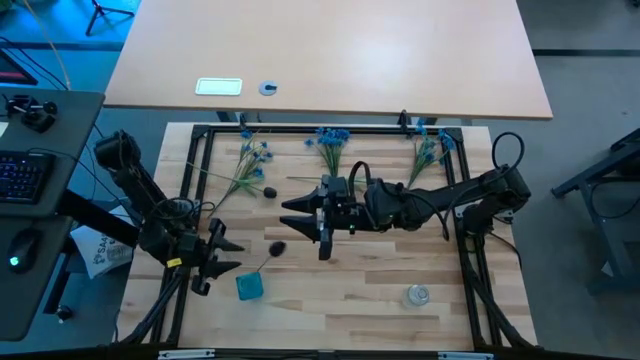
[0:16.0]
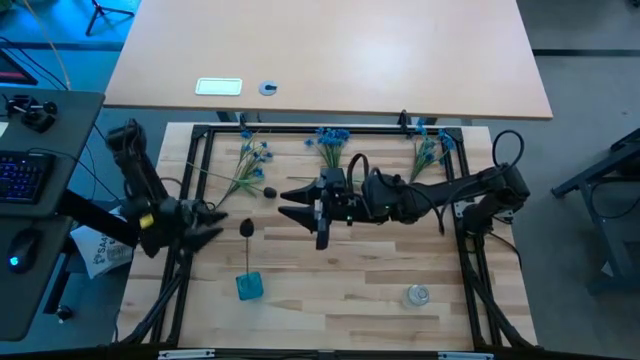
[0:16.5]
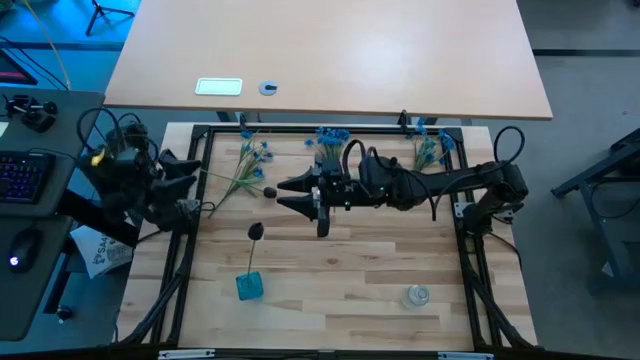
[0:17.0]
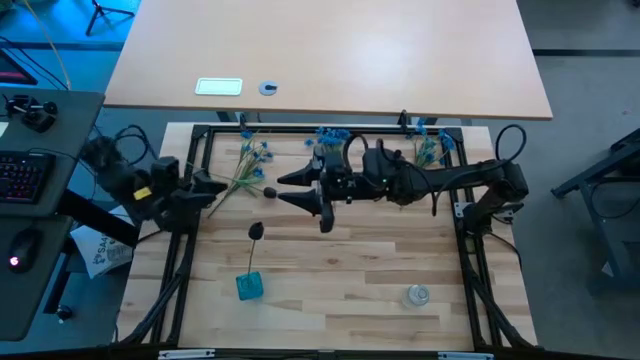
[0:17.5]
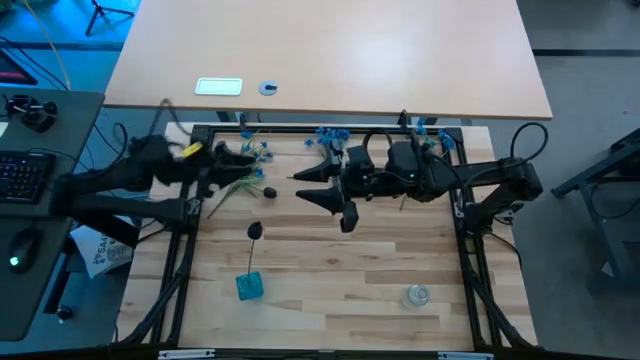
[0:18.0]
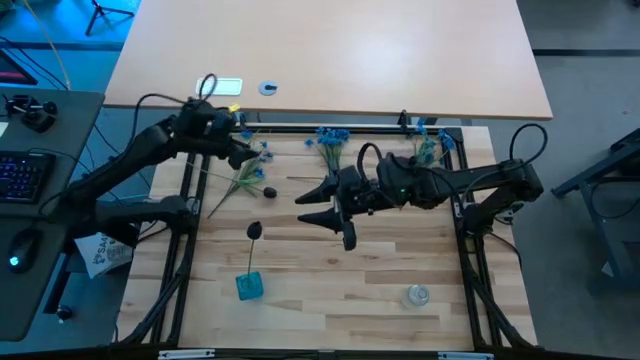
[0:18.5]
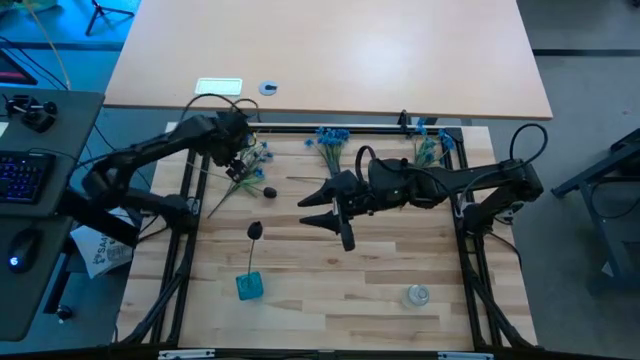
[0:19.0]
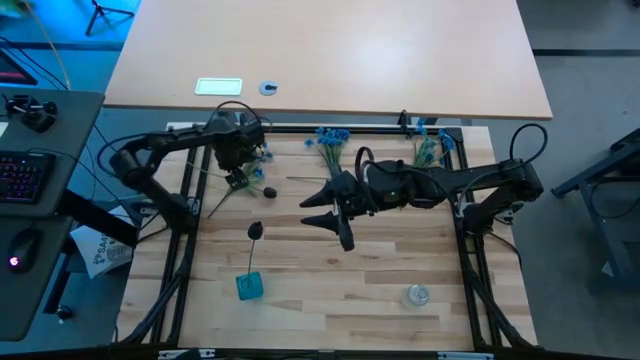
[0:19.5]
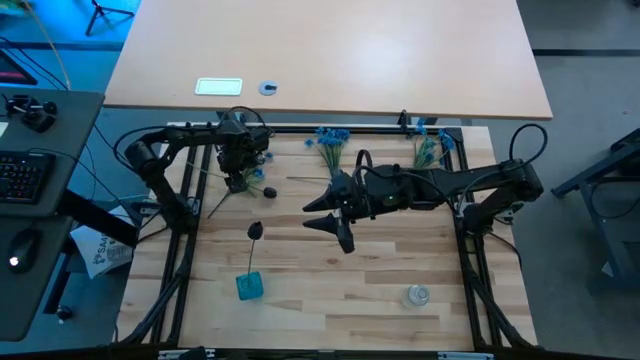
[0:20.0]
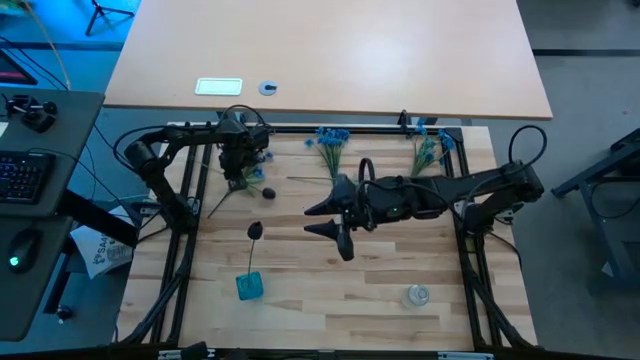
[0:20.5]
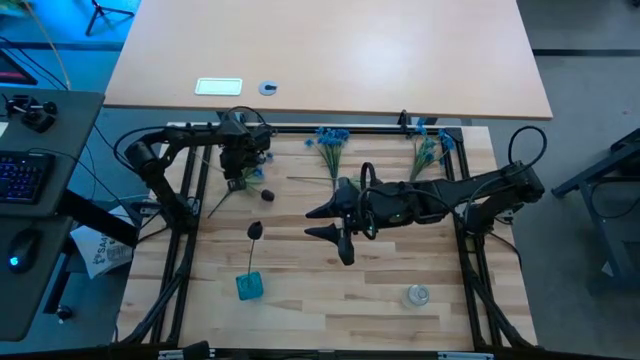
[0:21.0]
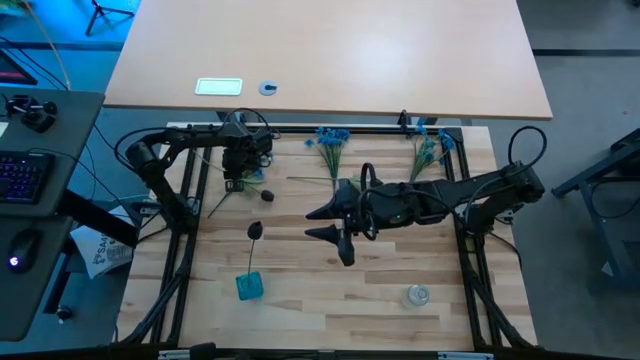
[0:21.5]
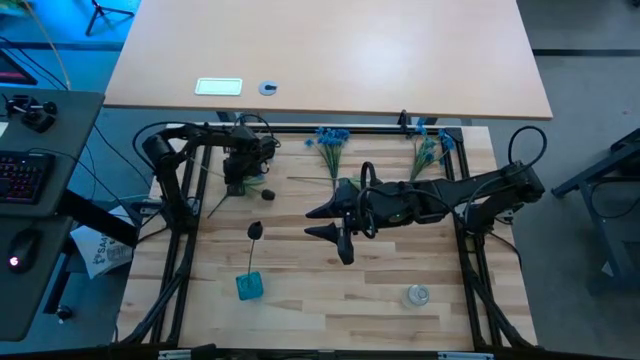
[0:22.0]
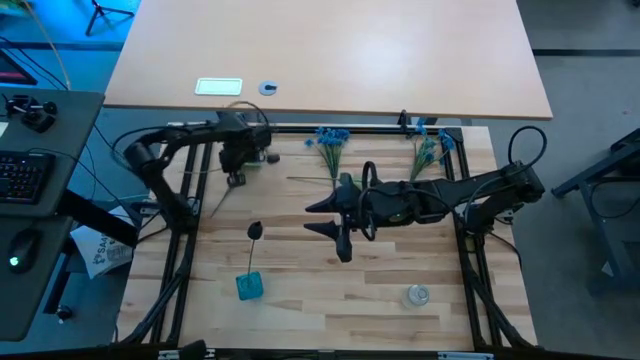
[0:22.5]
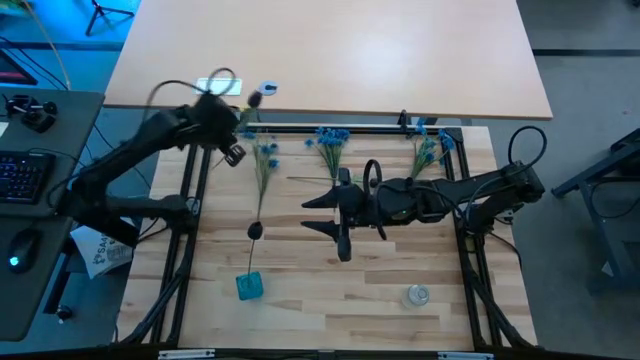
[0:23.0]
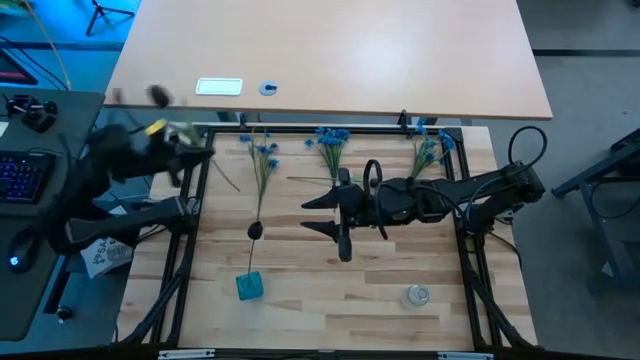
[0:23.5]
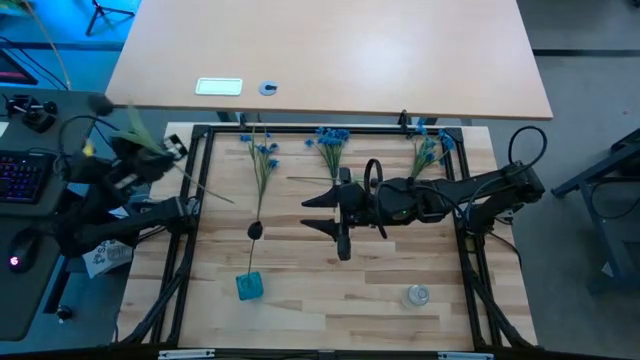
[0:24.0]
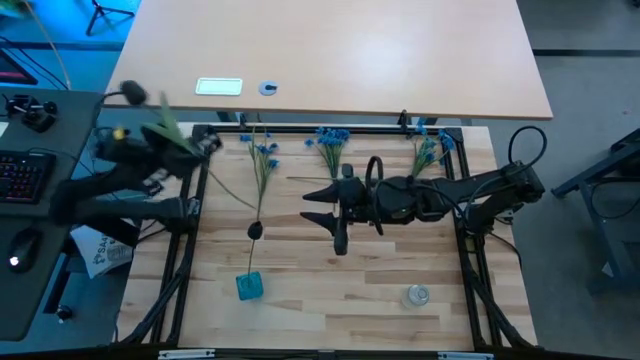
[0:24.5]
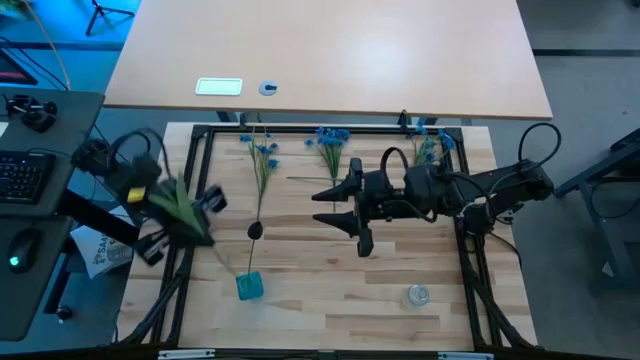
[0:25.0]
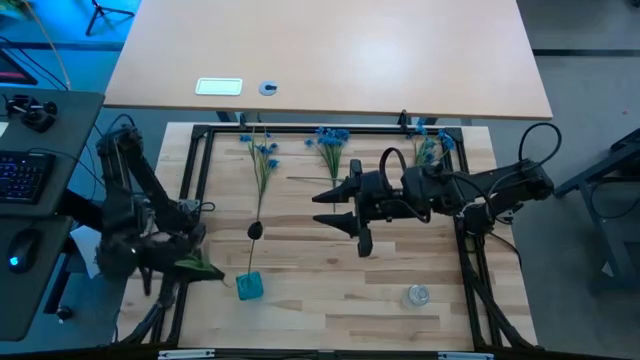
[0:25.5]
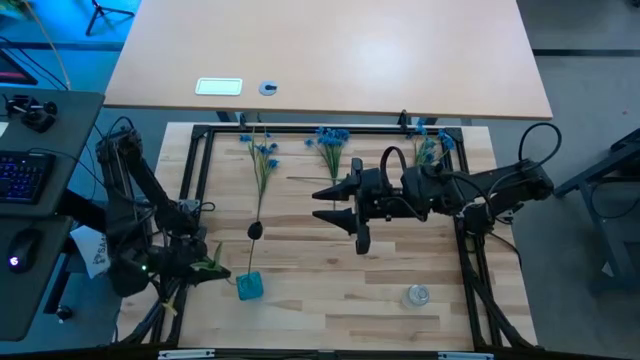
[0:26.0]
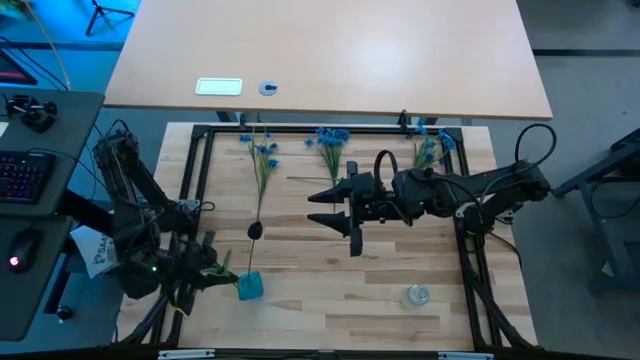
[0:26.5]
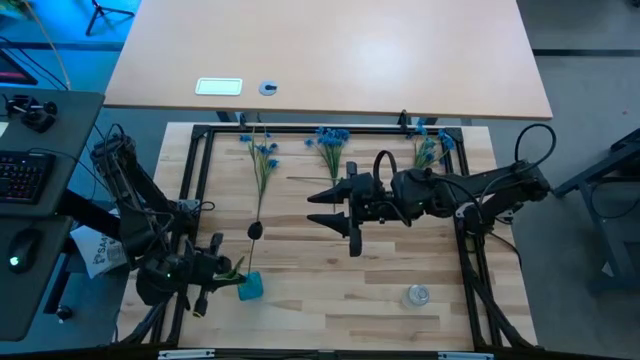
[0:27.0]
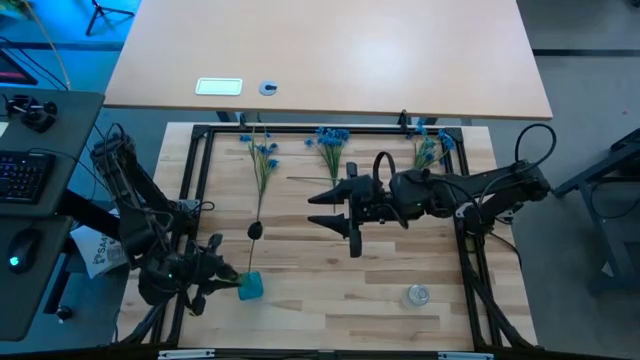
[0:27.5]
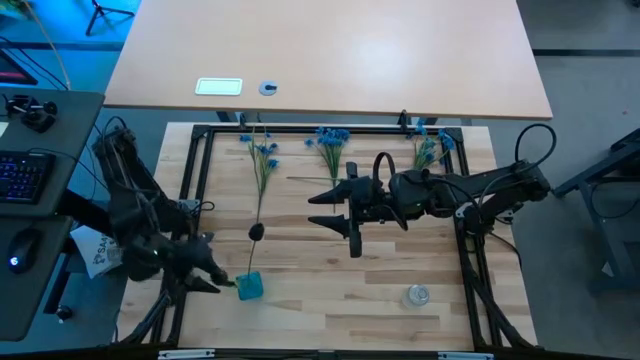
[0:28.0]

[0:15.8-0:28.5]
Task: Sort flowers into vase by color
Put the left black flower into the blue vase

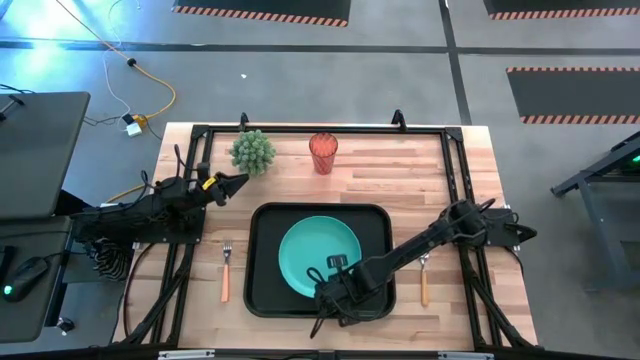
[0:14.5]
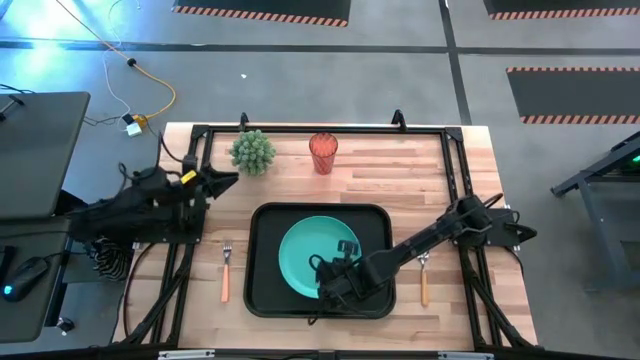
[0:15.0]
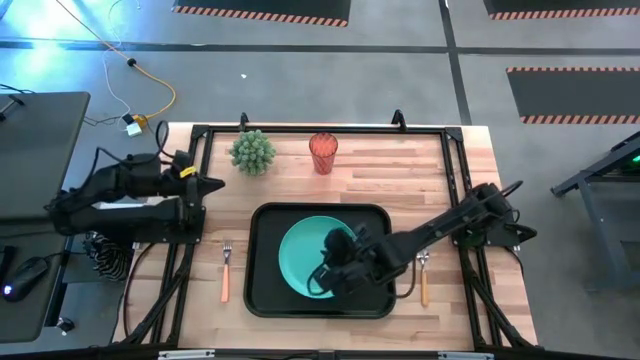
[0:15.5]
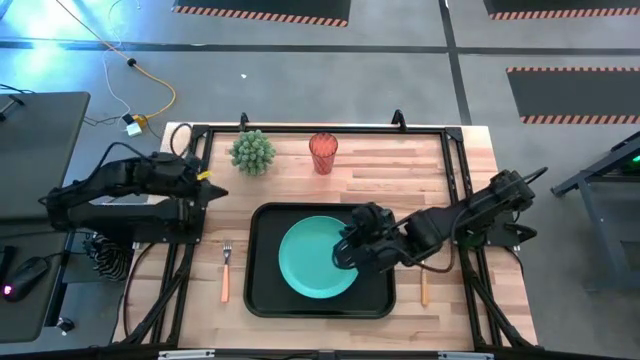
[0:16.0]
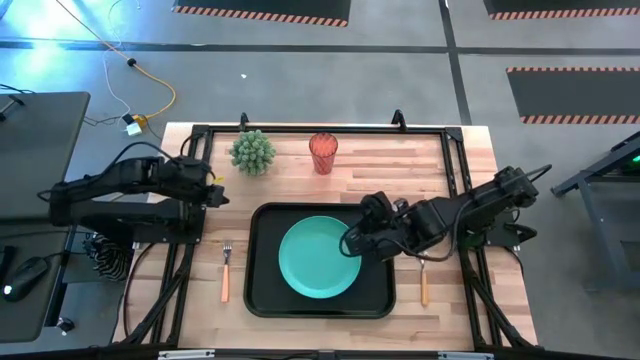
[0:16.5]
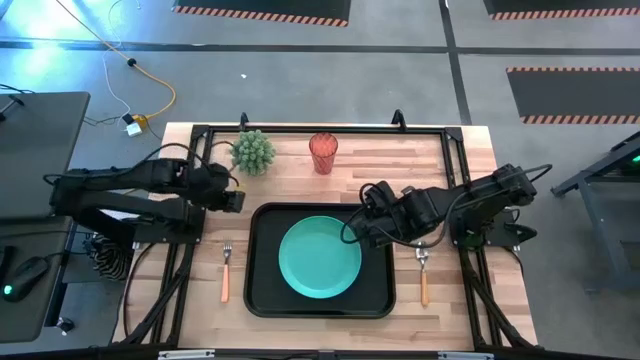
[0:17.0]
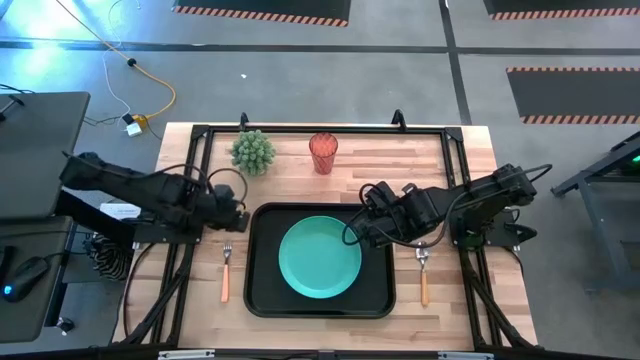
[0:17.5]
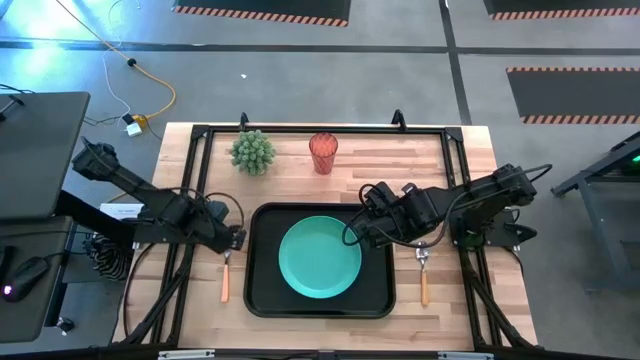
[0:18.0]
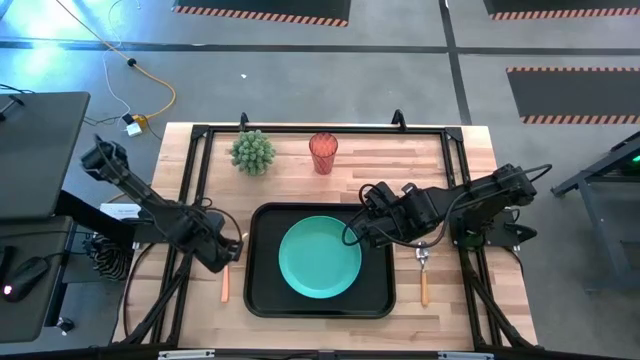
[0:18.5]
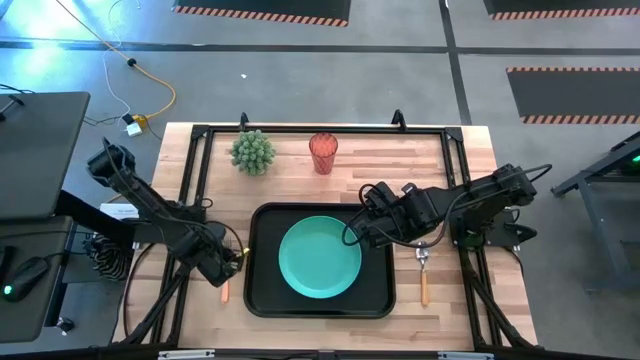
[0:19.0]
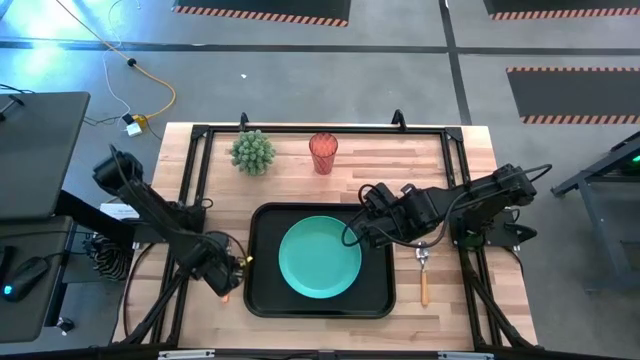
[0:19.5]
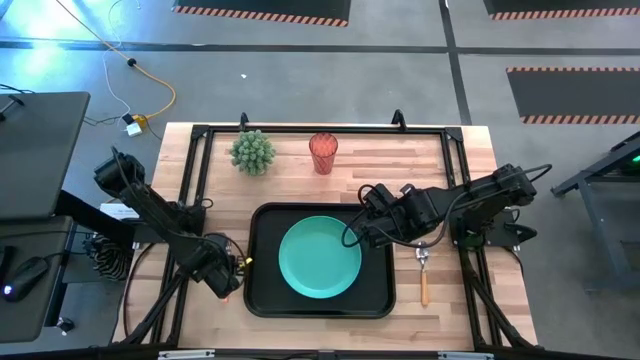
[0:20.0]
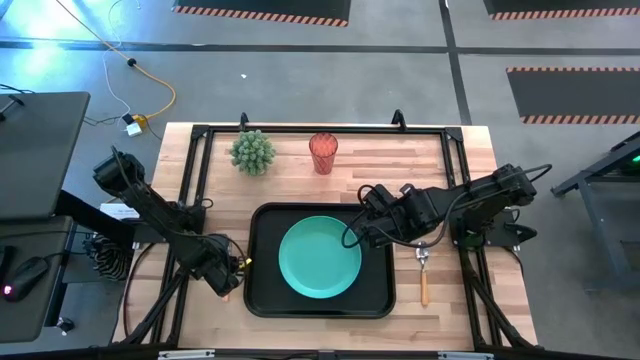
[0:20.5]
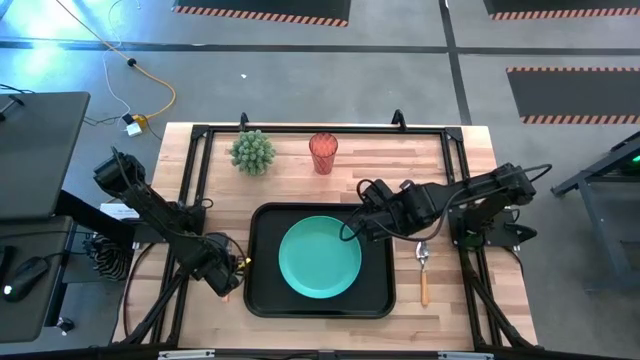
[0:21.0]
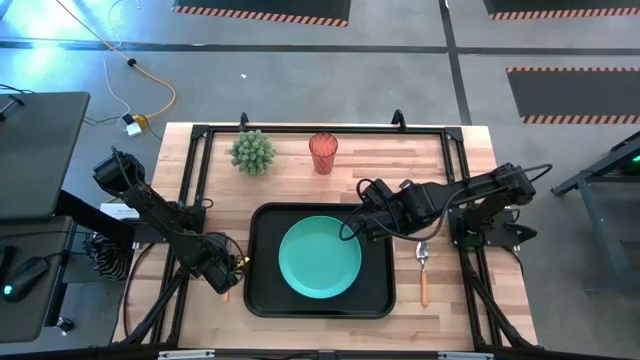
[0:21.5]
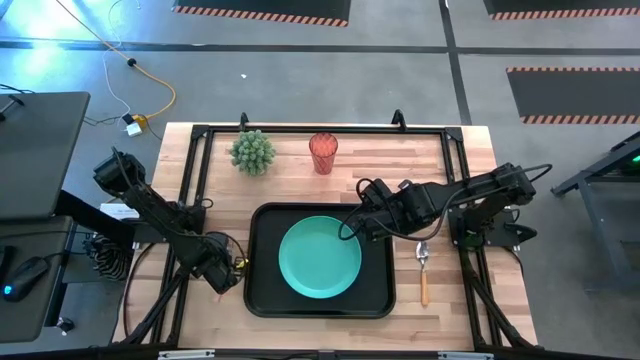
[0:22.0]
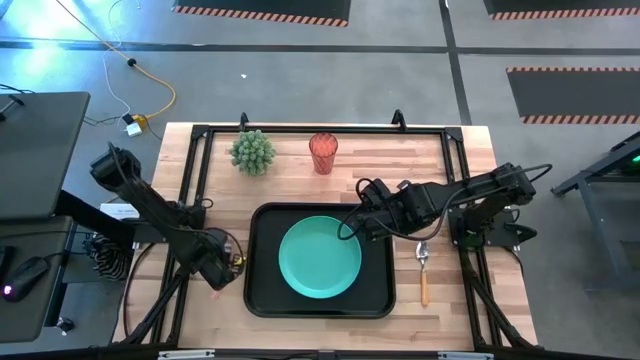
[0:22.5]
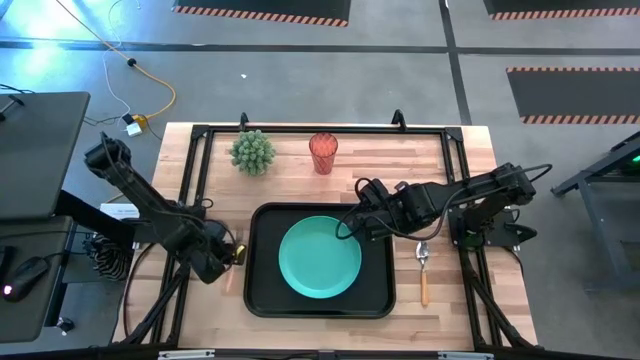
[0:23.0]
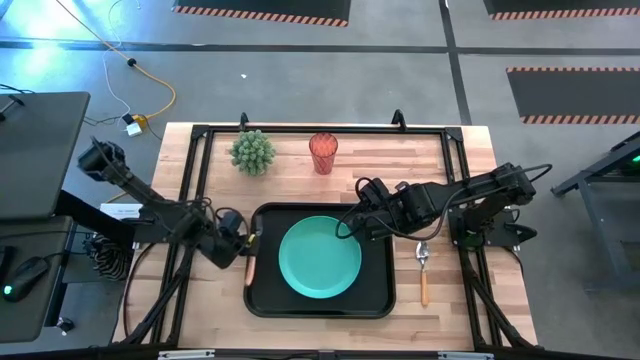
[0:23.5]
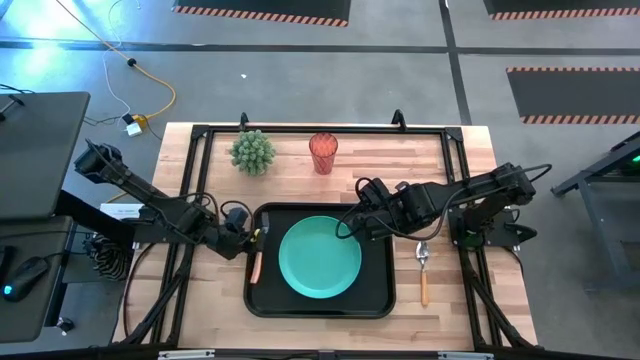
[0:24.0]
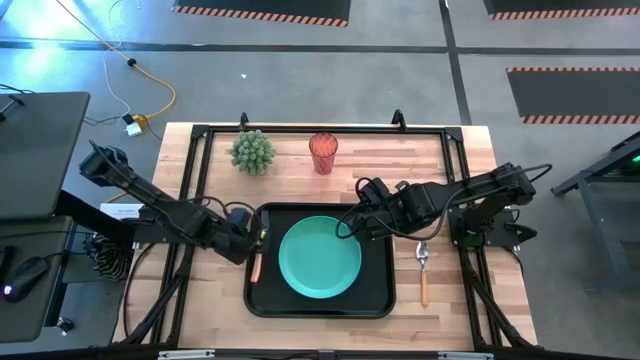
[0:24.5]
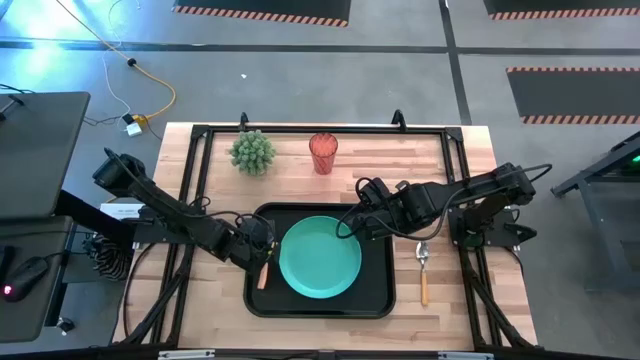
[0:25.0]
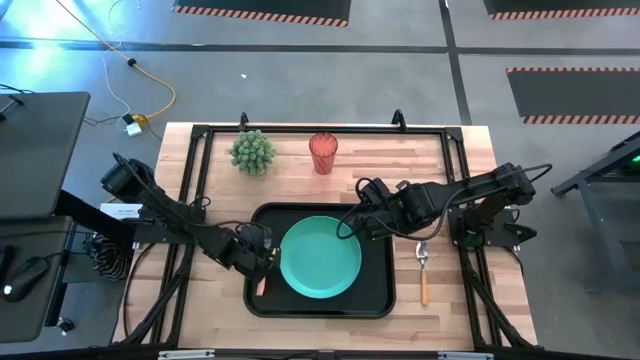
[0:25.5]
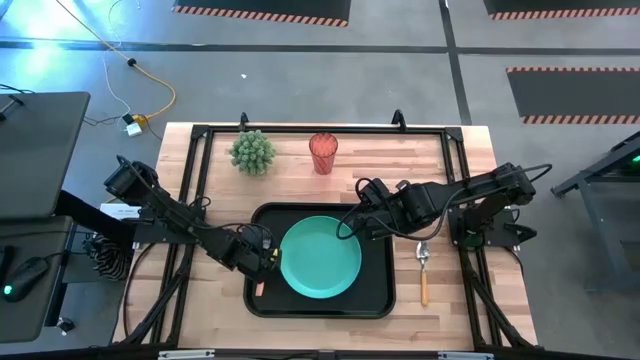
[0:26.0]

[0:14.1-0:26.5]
Task: Pick and place plate/cup/fork/spoon on tray
Put the orange fork on the black tray to the left of the blue plate
